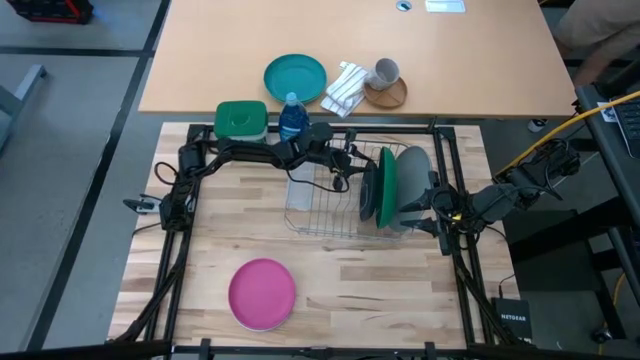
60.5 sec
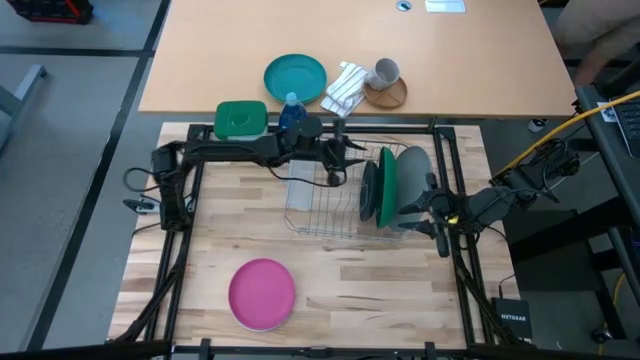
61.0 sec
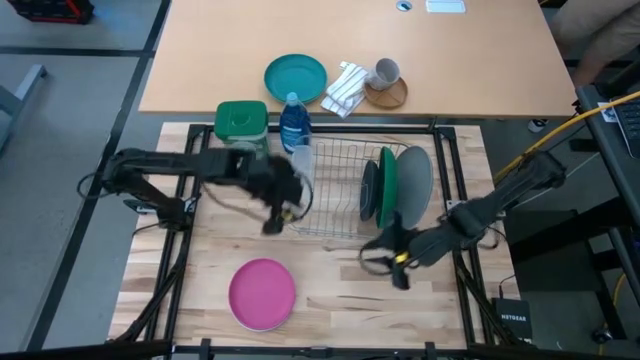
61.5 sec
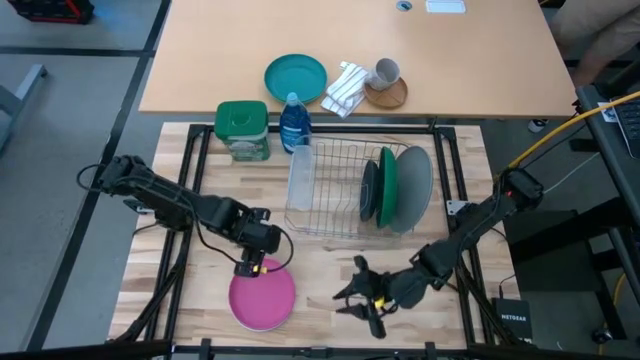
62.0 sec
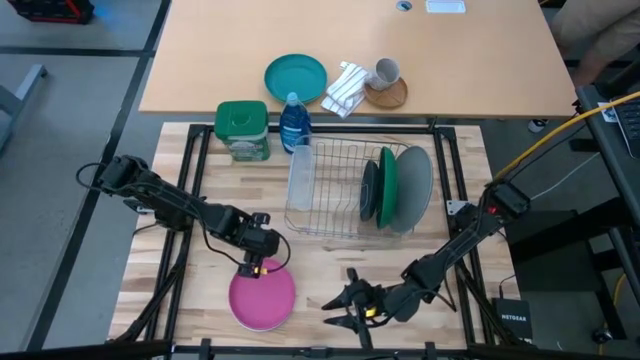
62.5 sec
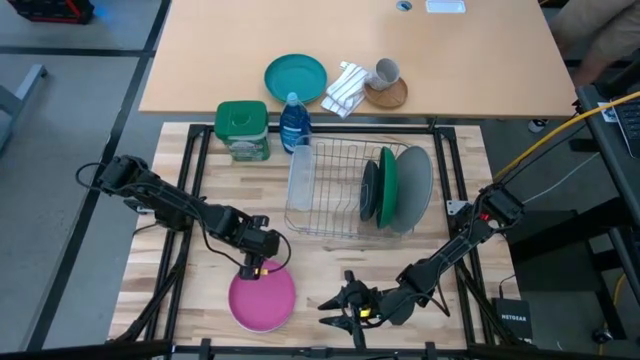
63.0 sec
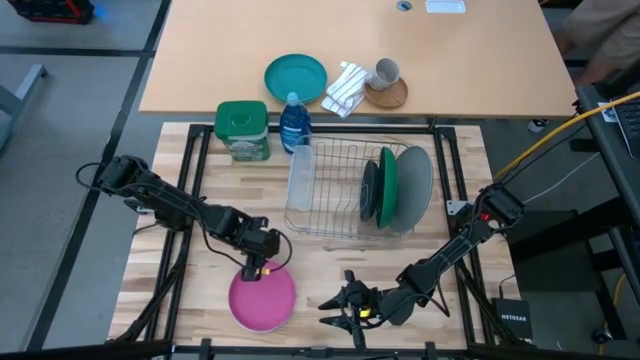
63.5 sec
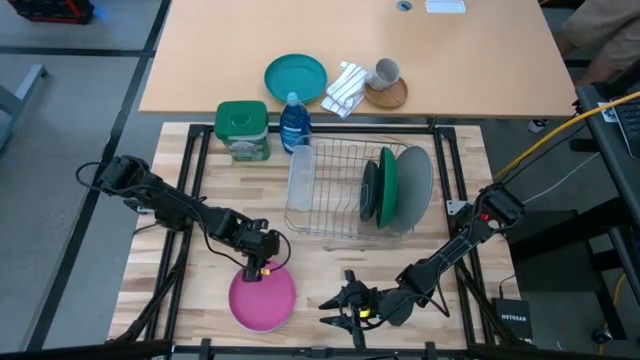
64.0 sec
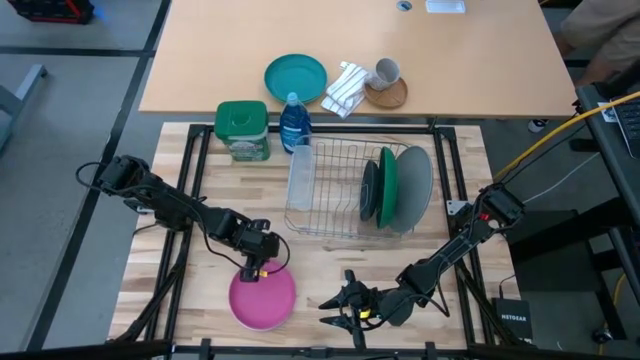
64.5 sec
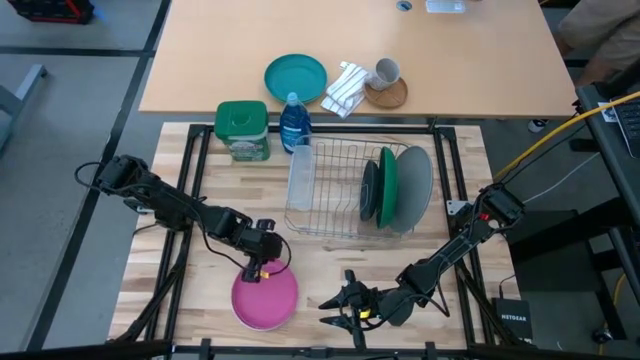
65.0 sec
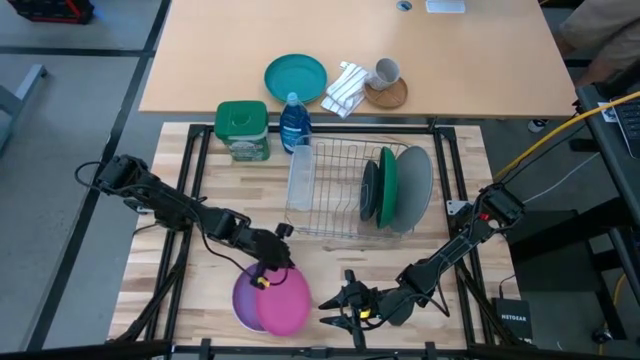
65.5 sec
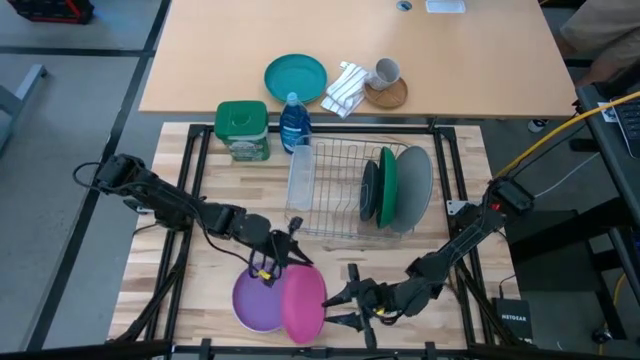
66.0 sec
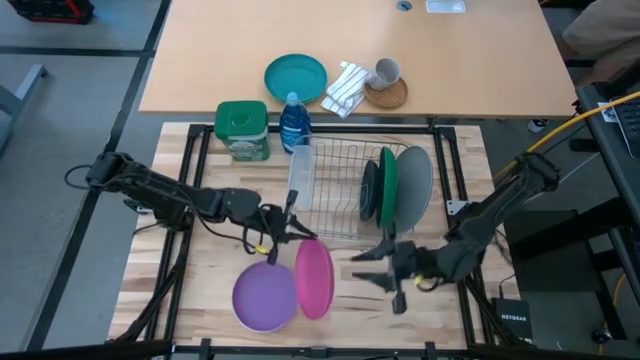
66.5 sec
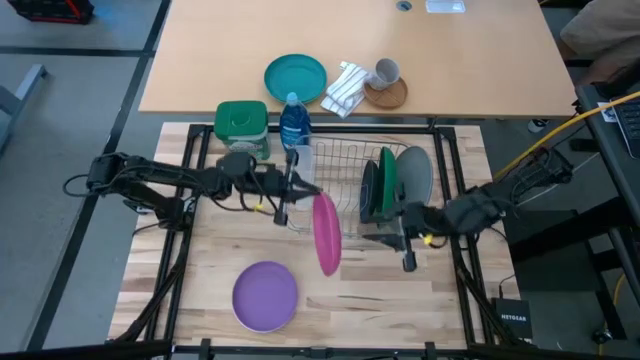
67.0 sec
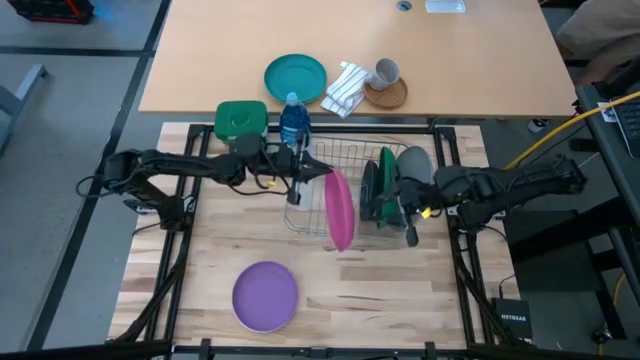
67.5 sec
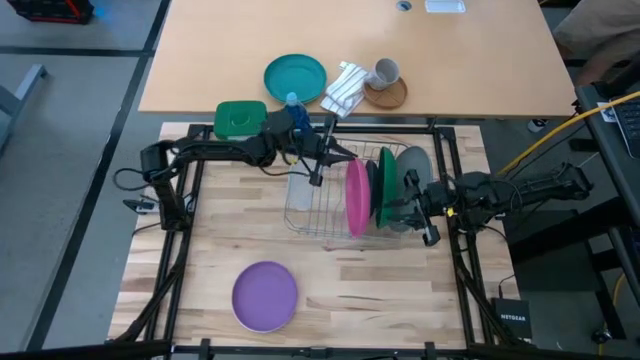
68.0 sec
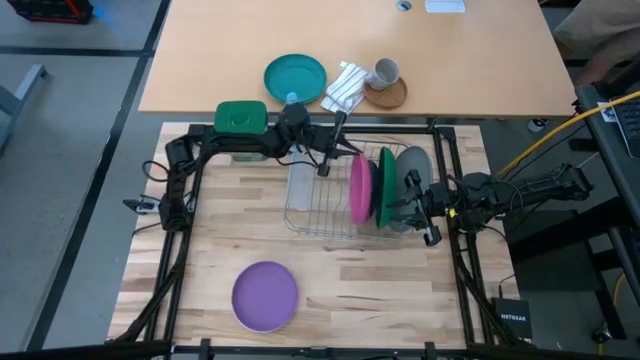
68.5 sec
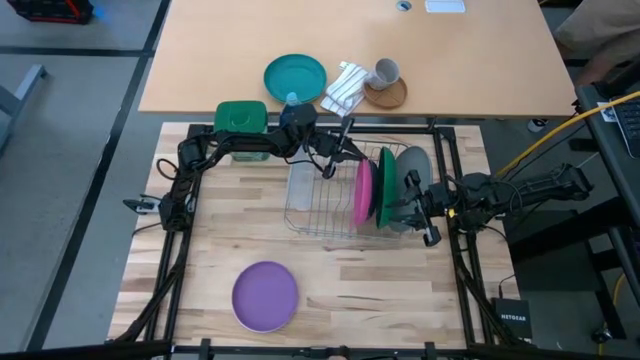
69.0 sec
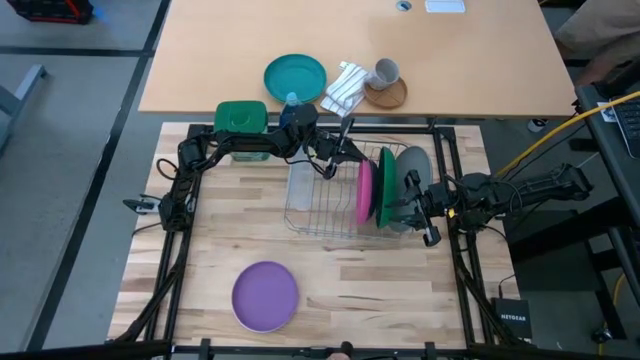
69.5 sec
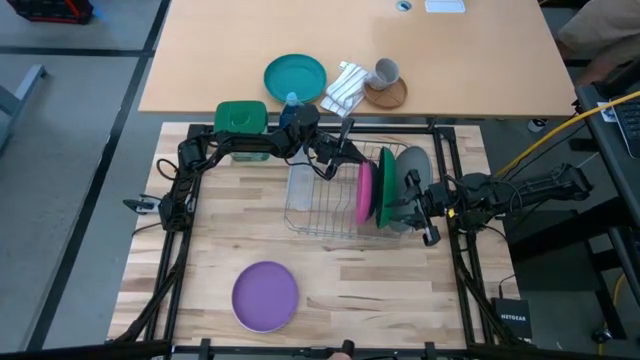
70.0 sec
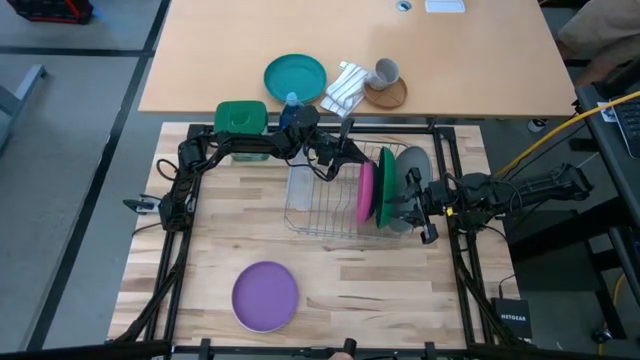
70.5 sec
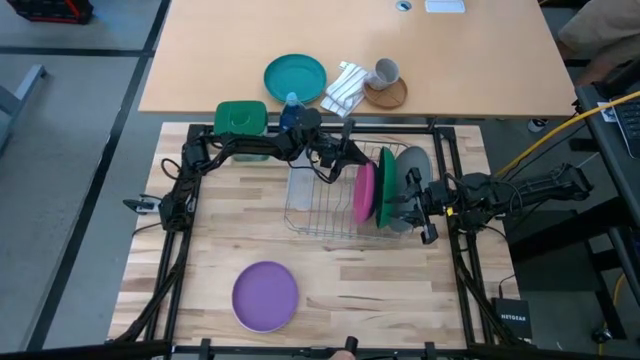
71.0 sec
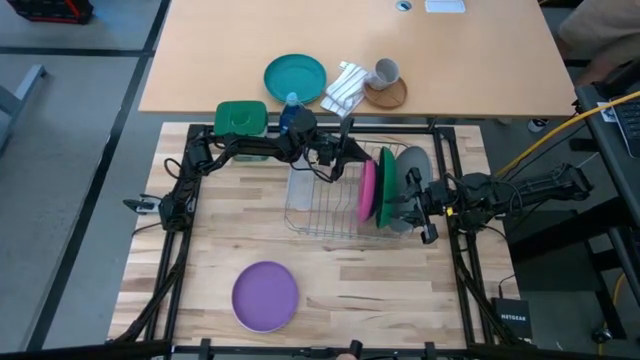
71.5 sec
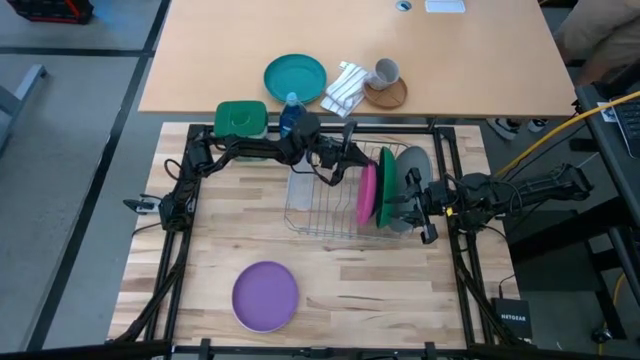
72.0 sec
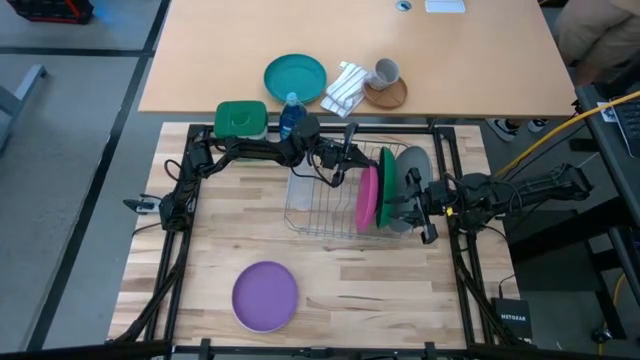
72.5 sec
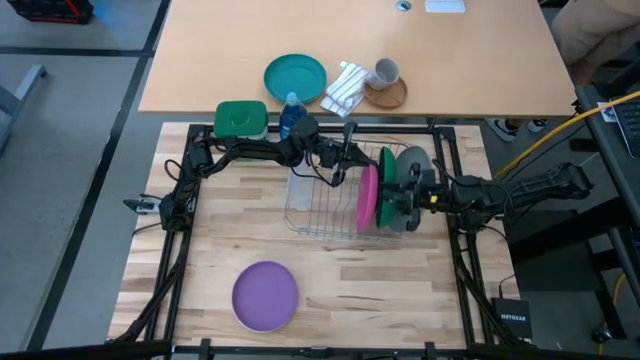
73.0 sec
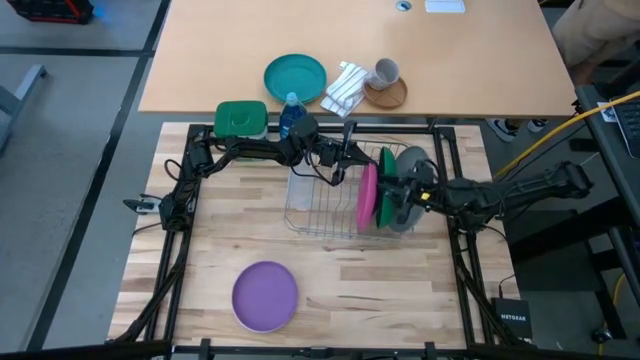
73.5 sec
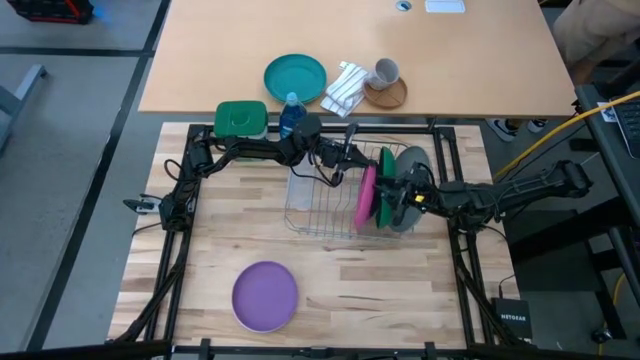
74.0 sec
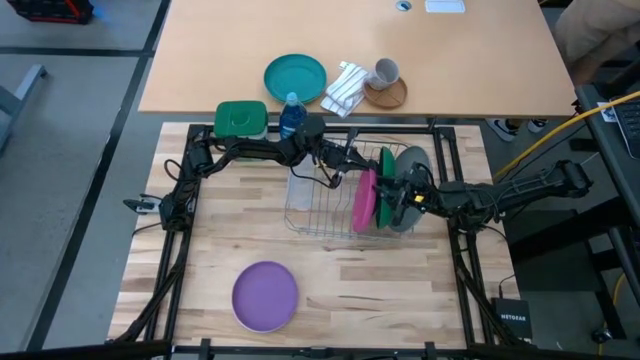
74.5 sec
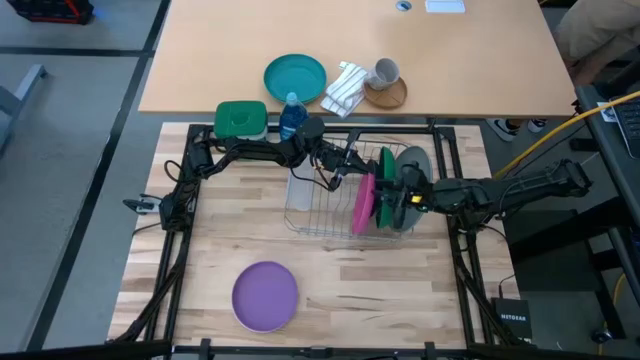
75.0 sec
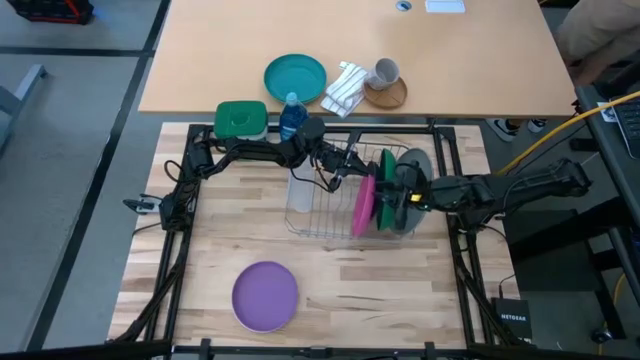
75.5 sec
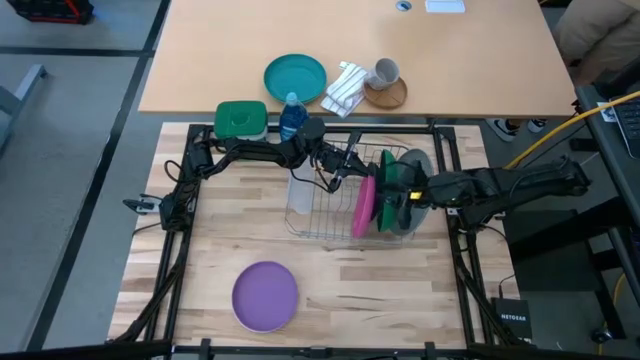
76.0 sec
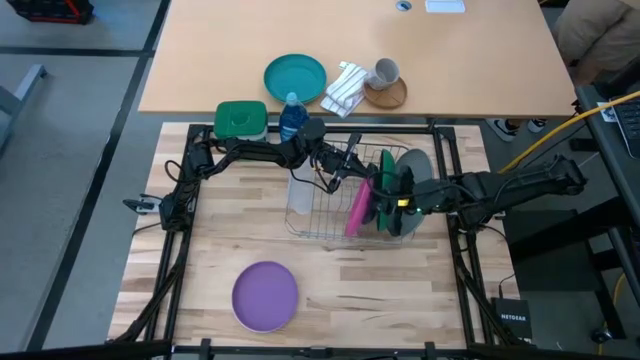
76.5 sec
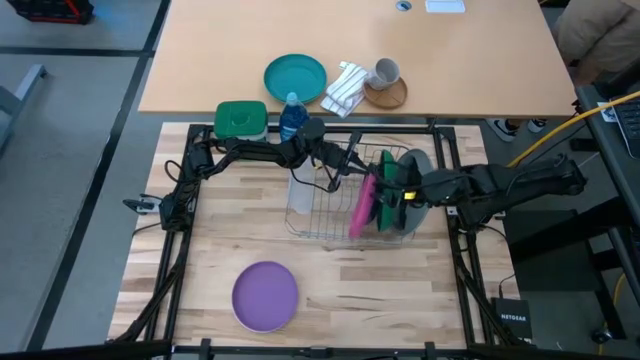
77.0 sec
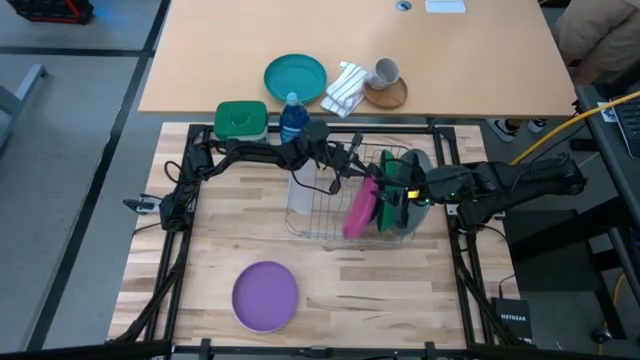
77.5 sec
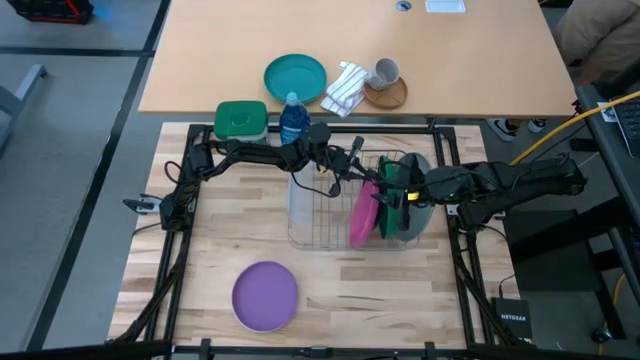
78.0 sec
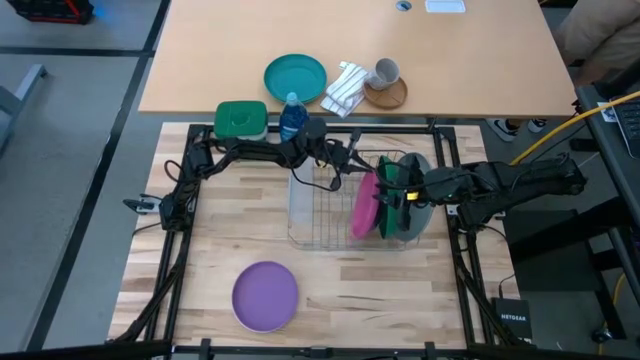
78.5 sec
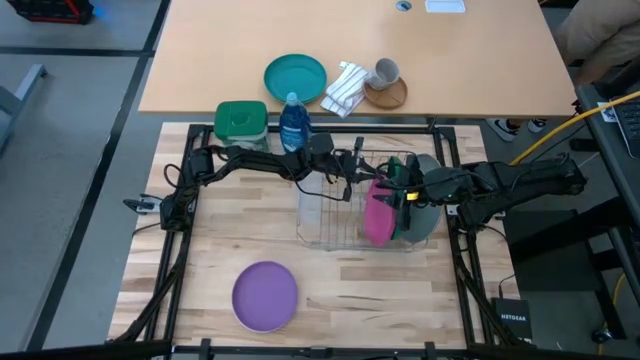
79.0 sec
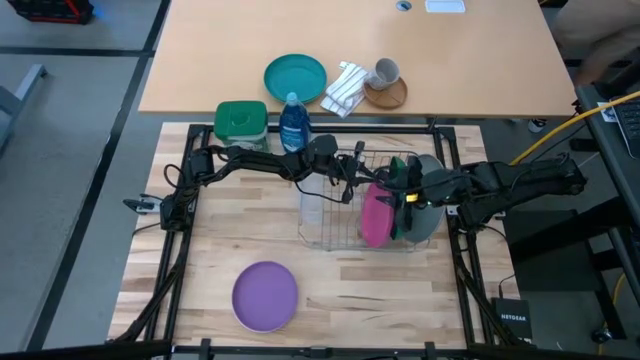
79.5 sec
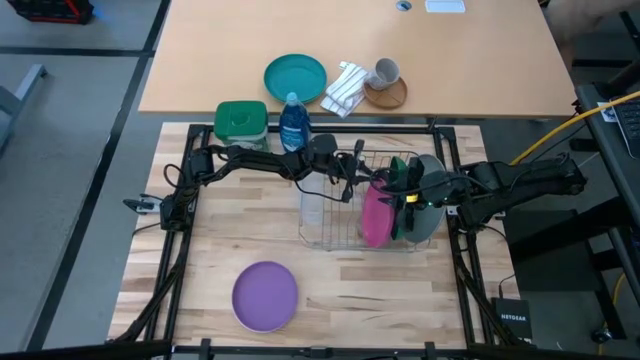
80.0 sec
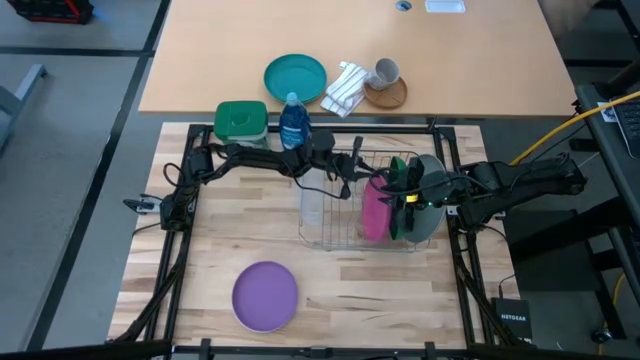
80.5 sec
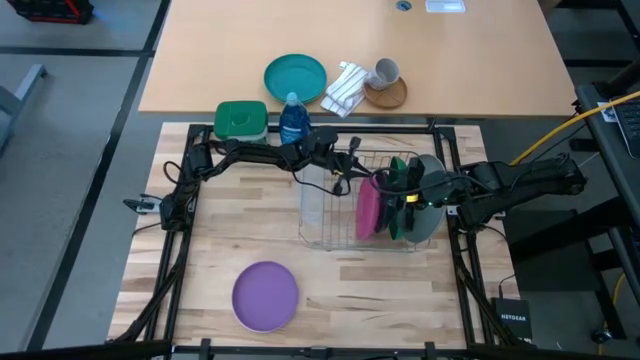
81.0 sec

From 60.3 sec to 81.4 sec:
Task: Sort dishes
Put the pink plate into the dish rack
